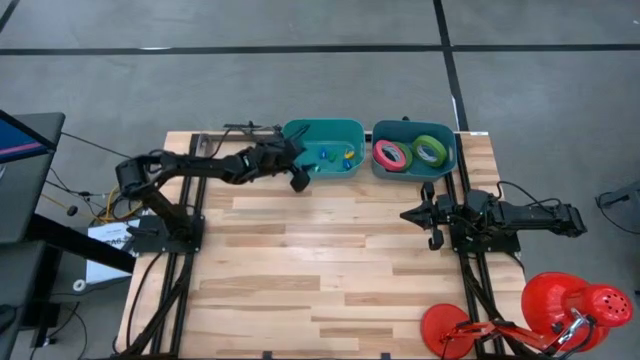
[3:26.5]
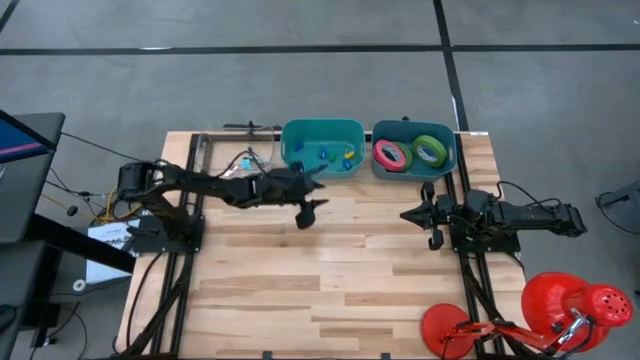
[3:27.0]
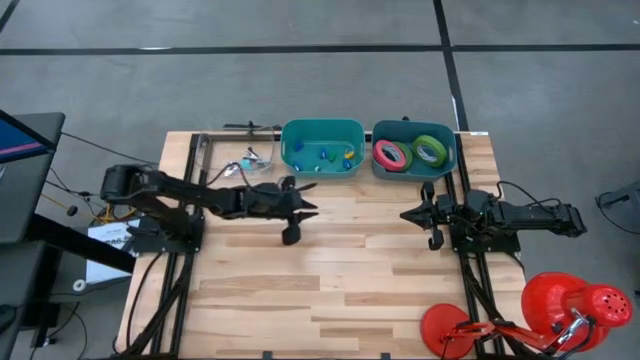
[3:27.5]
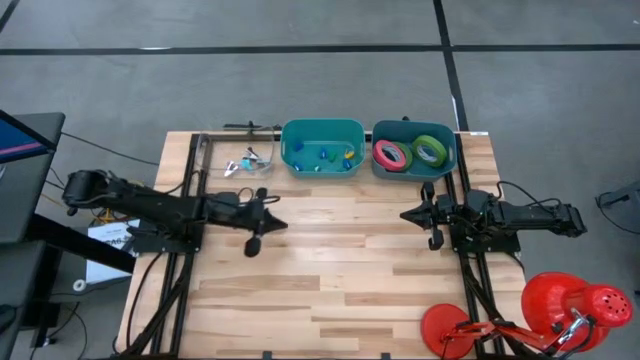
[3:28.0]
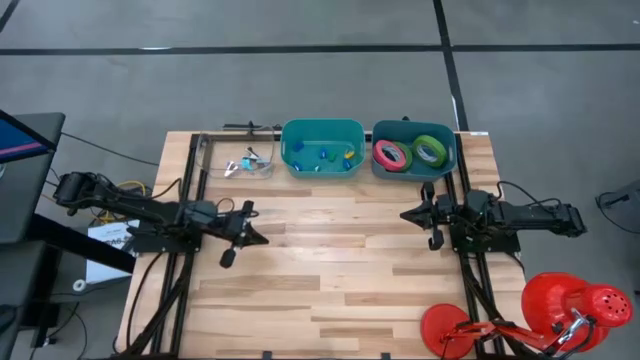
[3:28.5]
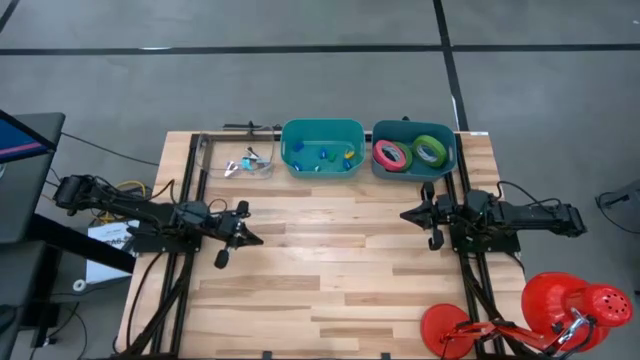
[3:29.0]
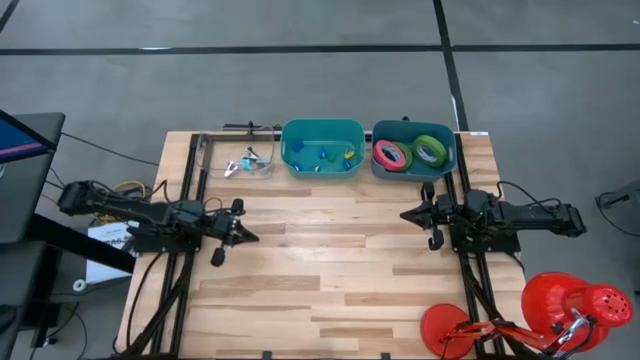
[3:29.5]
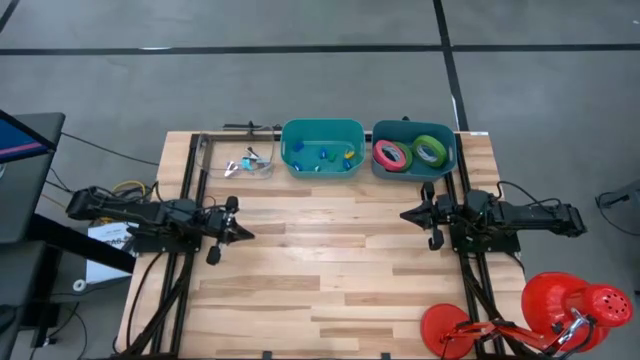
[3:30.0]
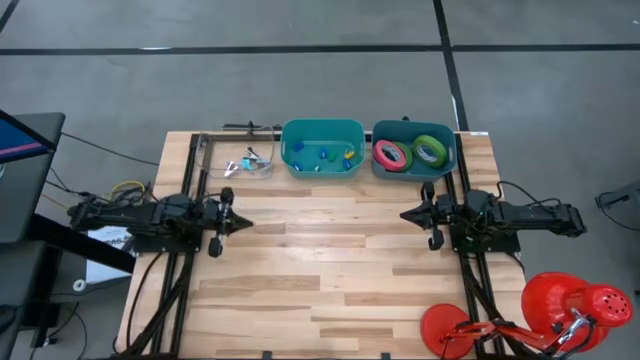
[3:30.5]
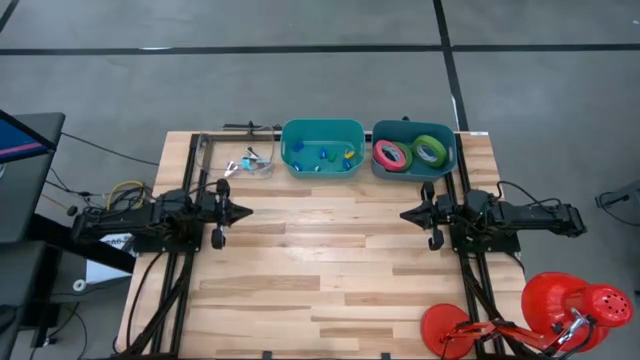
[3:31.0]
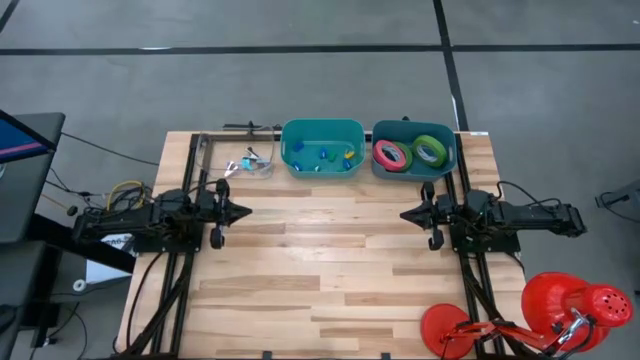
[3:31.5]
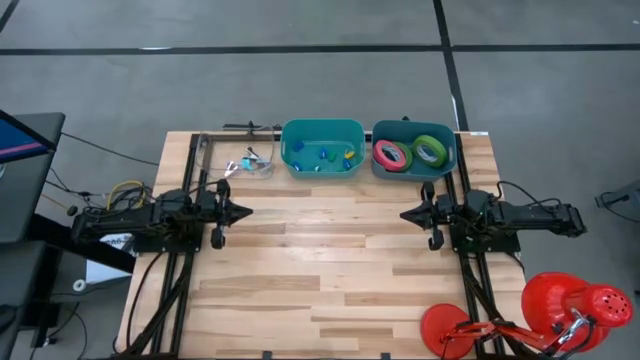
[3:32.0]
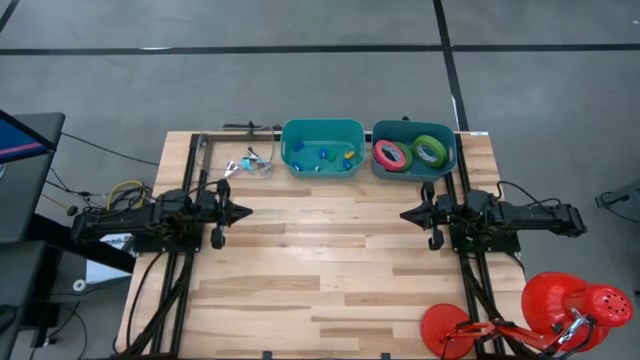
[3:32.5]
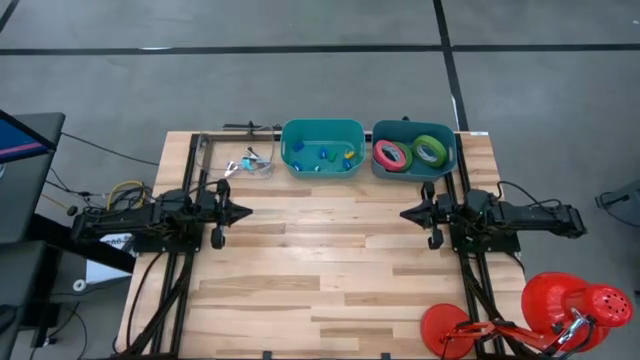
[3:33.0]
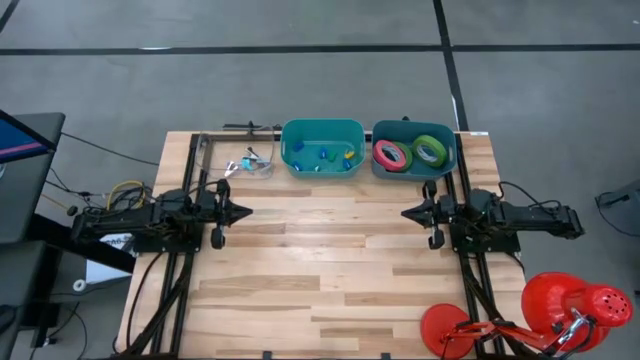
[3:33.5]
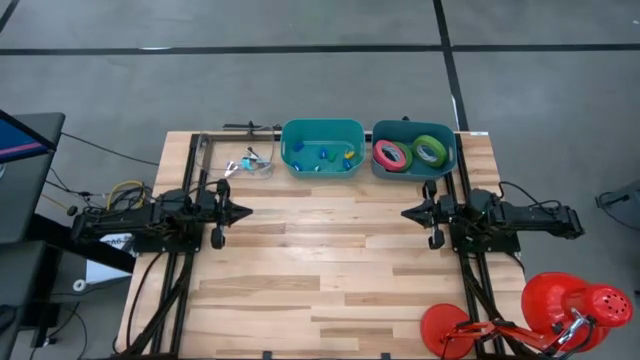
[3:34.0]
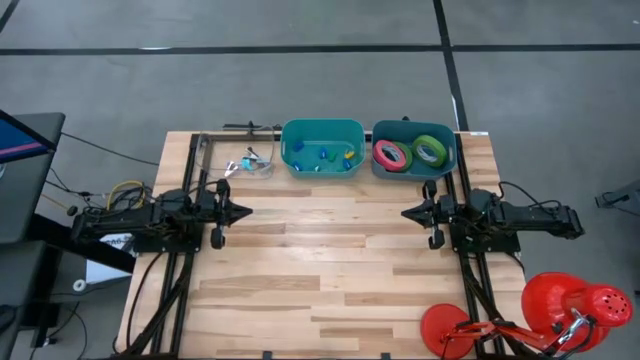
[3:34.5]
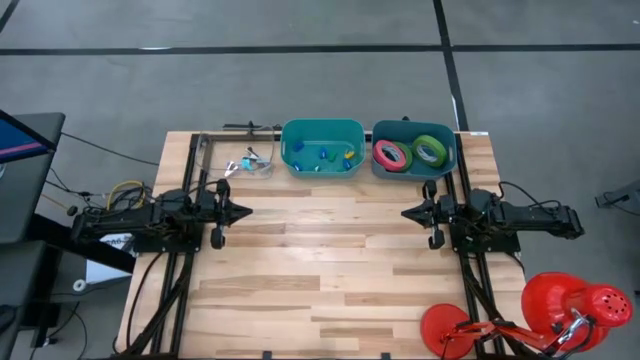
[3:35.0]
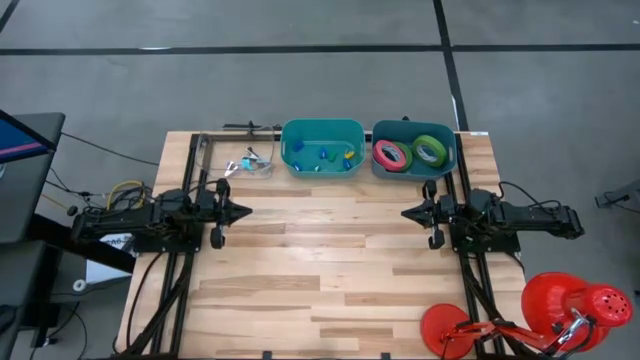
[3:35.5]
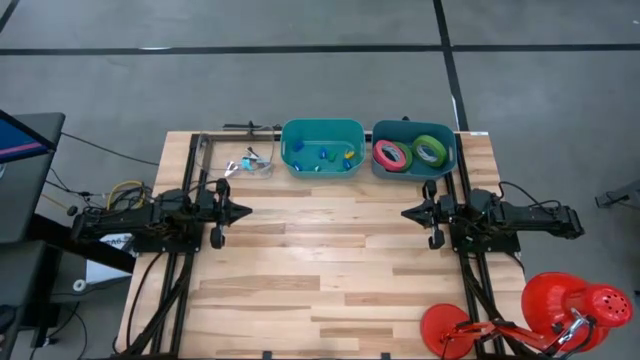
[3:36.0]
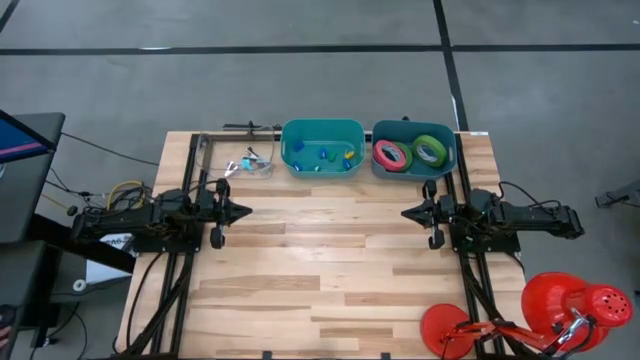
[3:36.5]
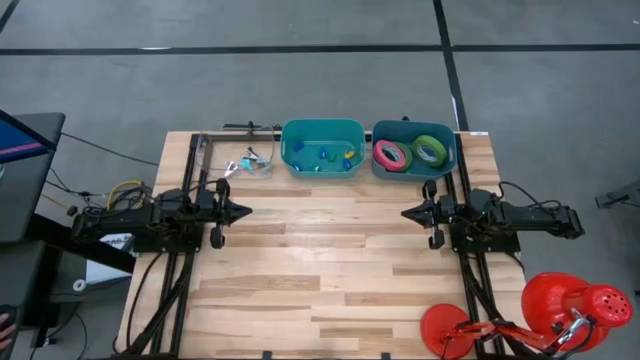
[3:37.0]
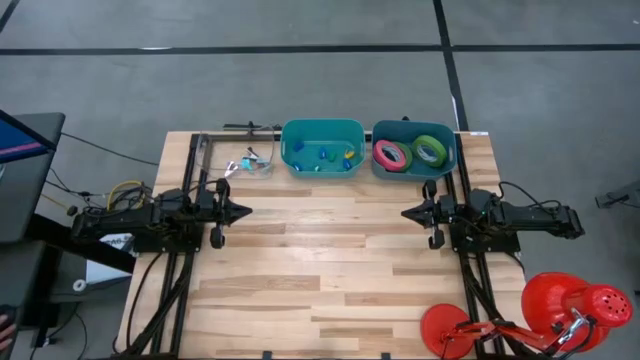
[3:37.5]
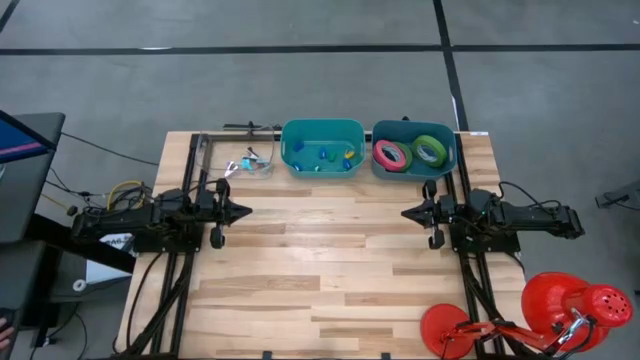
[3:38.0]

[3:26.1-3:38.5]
Task: Pick and place Stapler, Stapler remover, tape
Return to Home Position

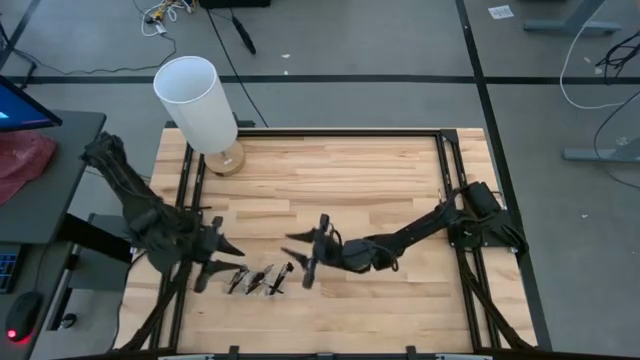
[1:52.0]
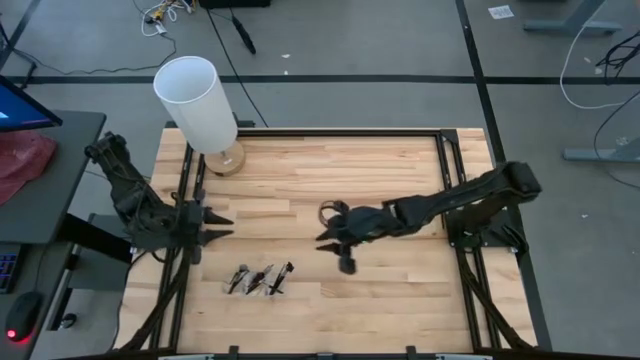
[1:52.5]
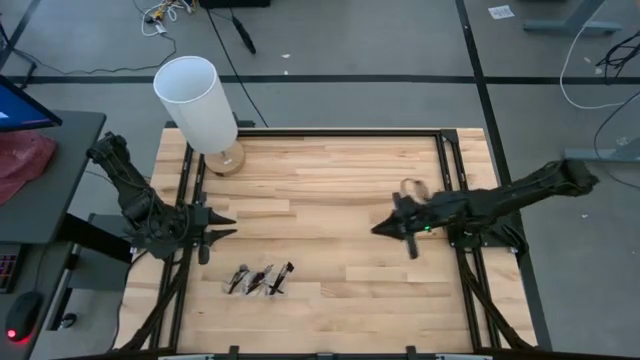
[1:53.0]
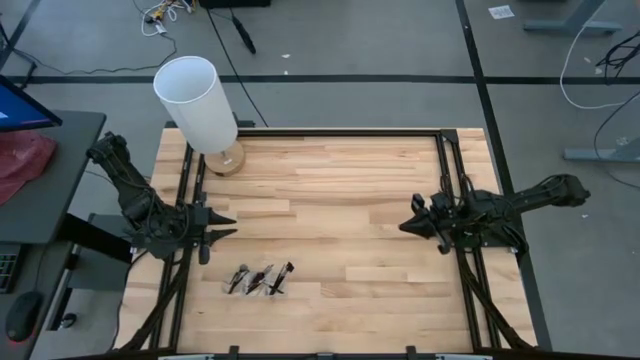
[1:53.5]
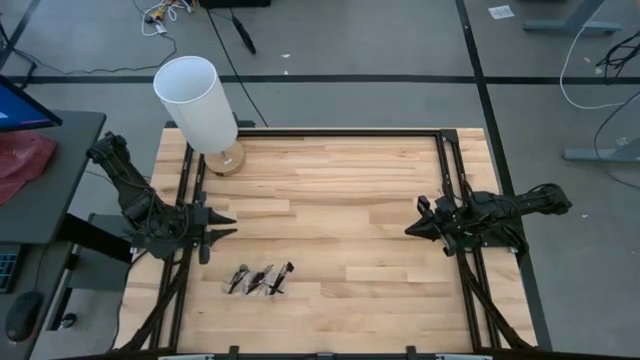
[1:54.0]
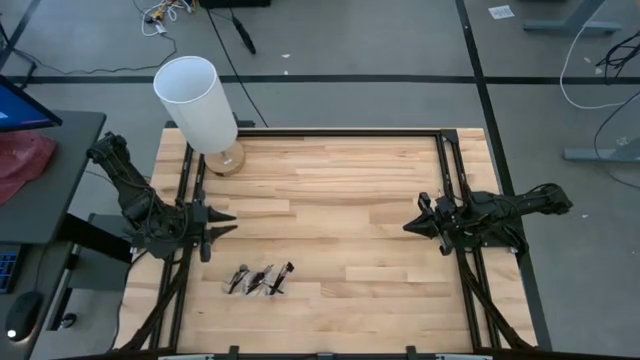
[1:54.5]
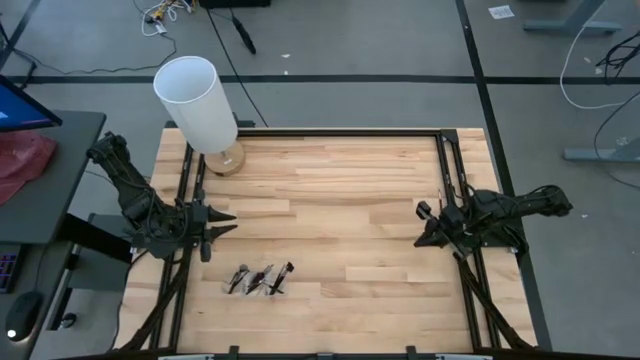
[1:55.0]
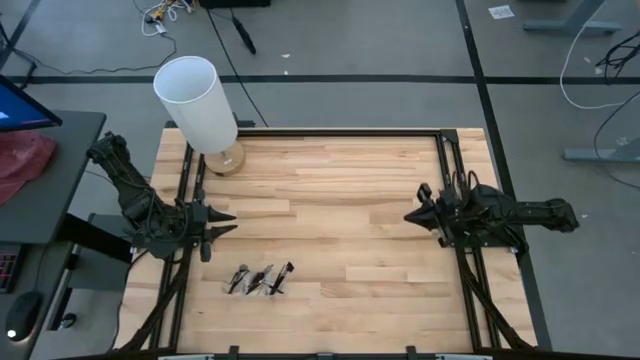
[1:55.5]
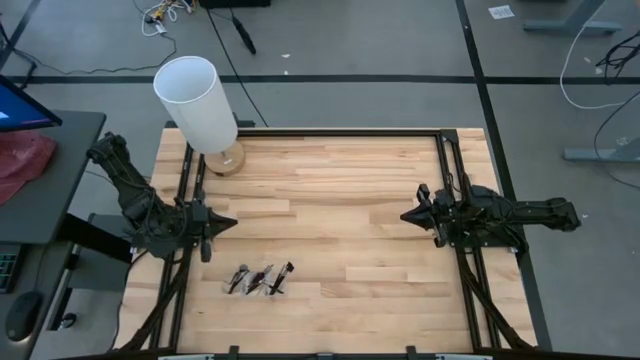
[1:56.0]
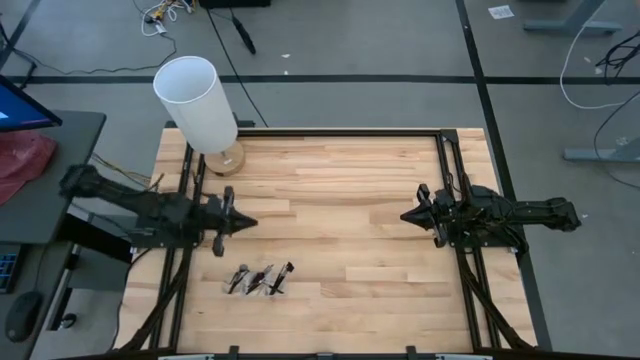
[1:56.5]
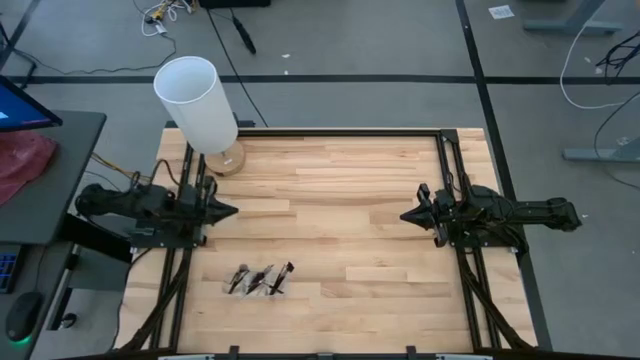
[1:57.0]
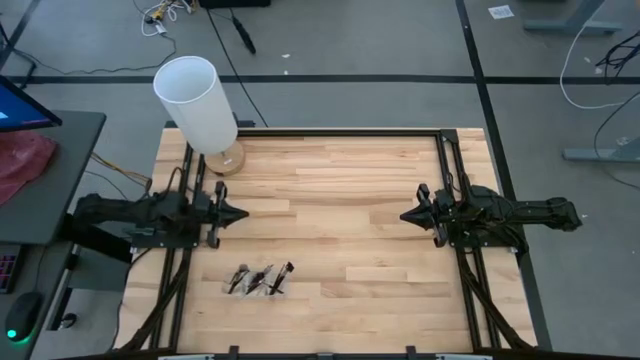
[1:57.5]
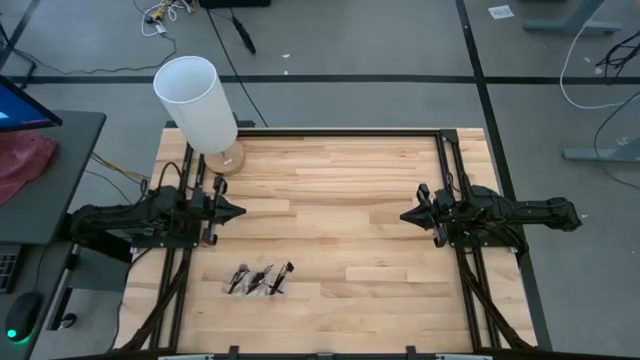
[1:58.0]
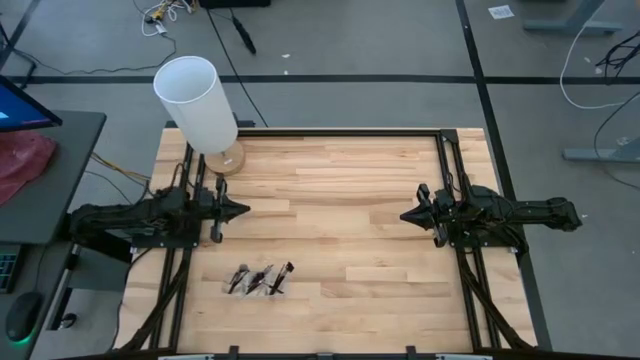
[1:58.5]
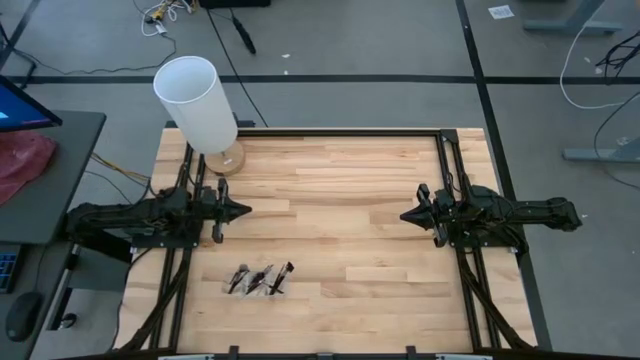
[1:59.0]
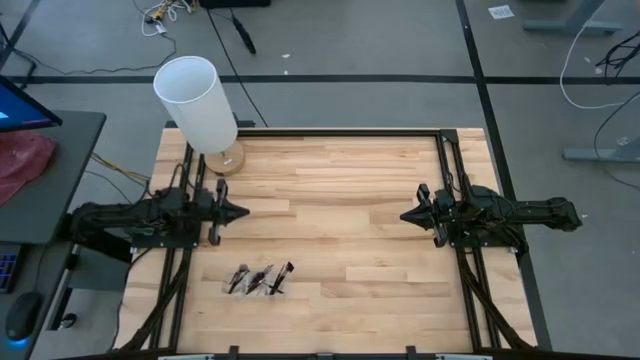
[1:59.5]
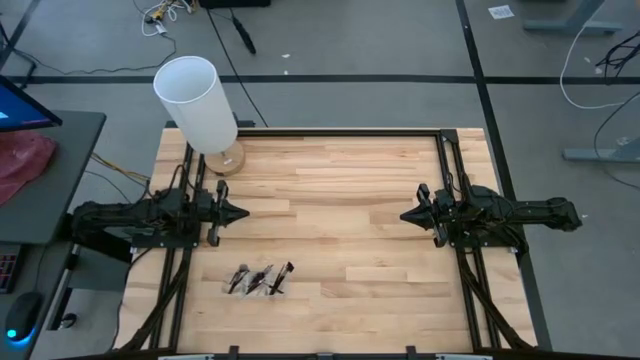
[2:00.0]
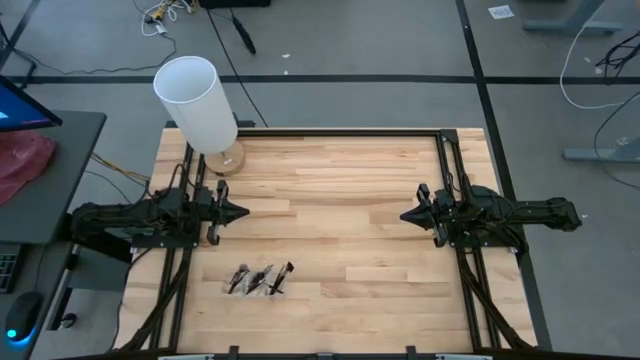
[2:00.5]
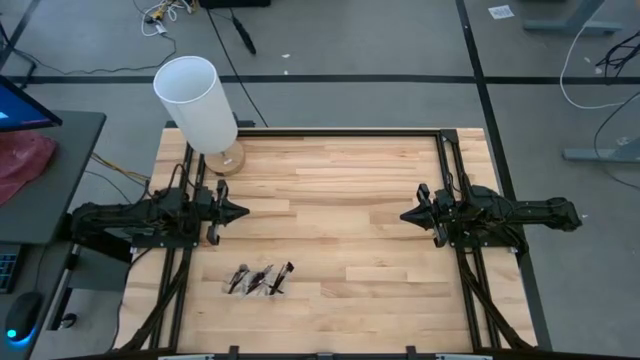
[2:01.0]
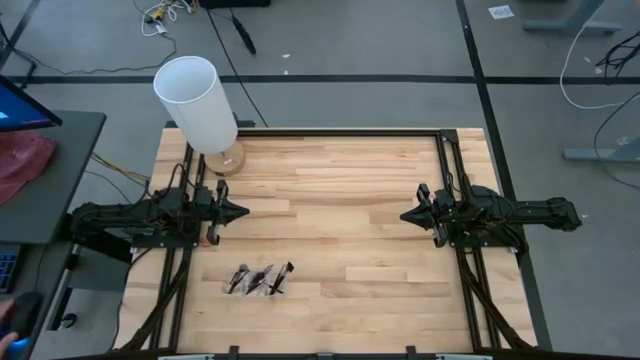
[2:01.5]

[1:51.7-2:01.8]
Task: Put items in baskets/containers
Return to Home Position
